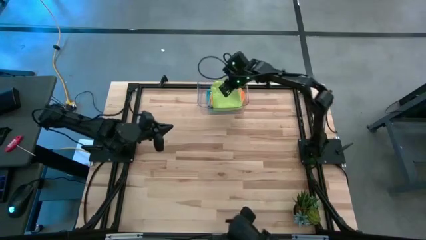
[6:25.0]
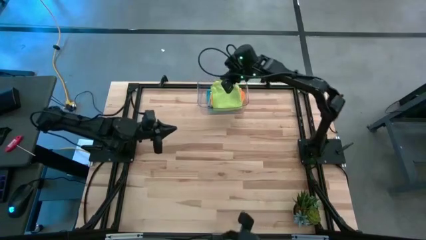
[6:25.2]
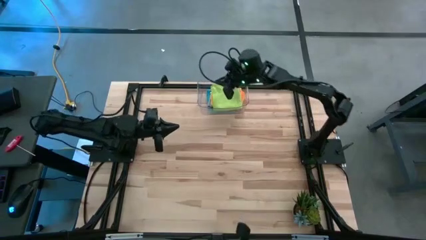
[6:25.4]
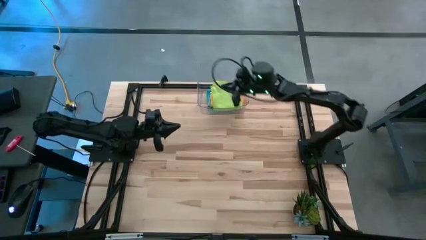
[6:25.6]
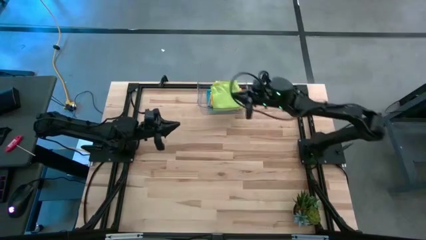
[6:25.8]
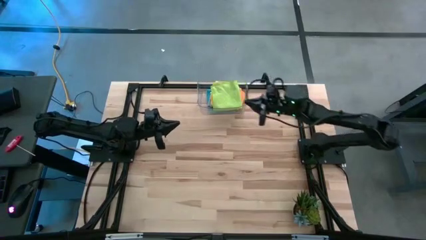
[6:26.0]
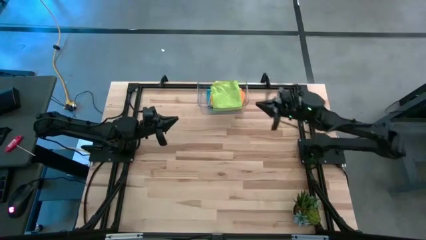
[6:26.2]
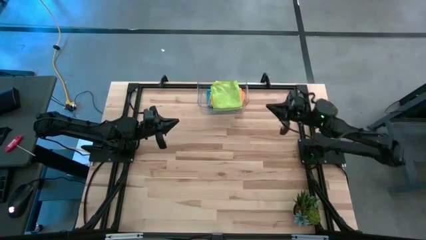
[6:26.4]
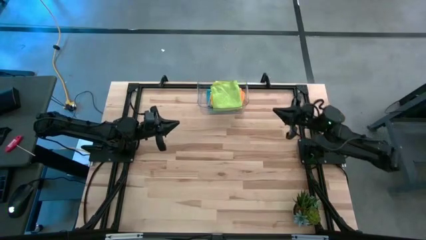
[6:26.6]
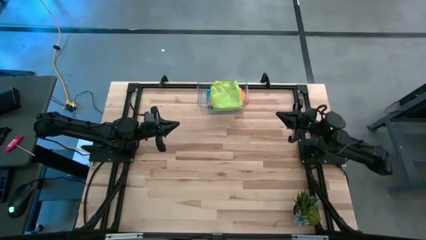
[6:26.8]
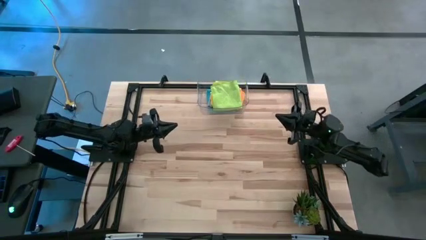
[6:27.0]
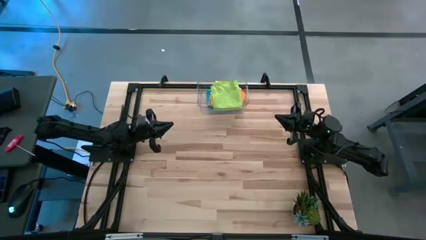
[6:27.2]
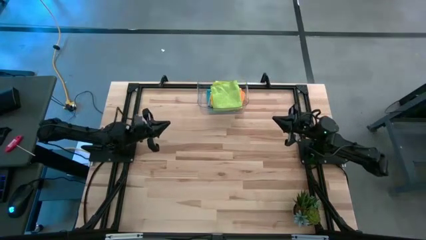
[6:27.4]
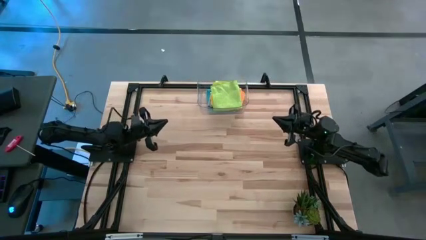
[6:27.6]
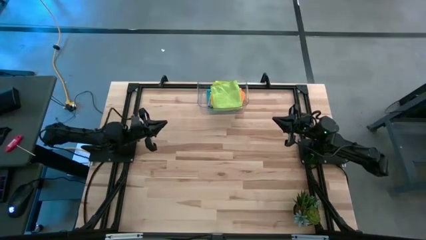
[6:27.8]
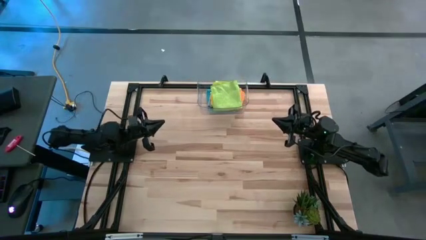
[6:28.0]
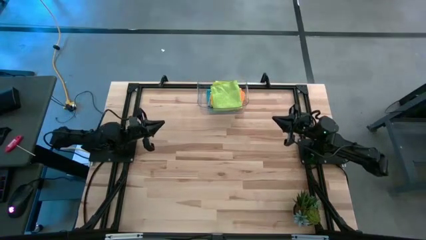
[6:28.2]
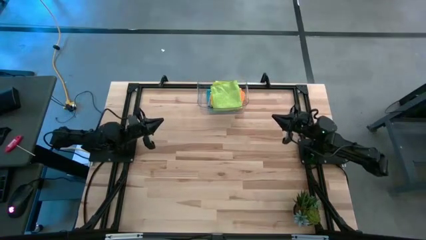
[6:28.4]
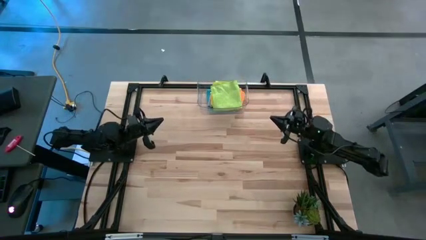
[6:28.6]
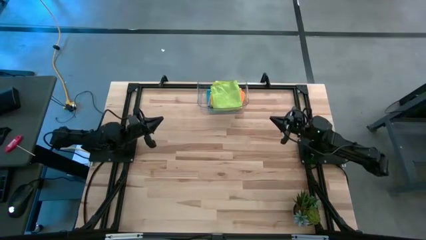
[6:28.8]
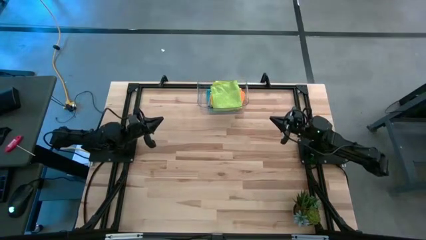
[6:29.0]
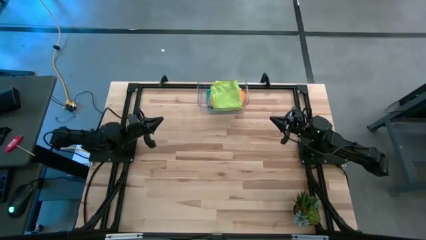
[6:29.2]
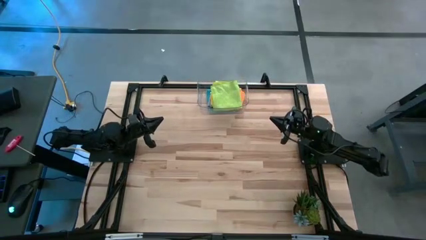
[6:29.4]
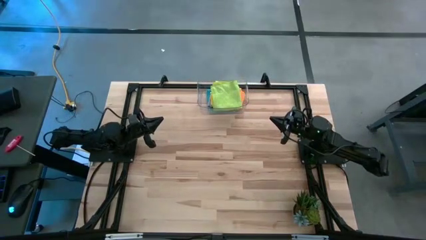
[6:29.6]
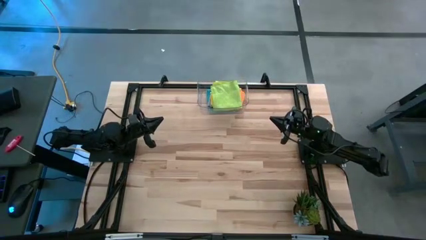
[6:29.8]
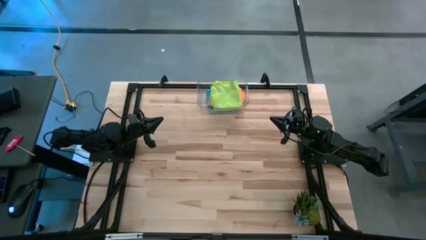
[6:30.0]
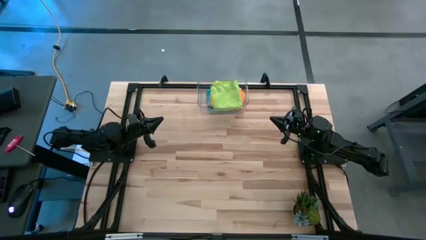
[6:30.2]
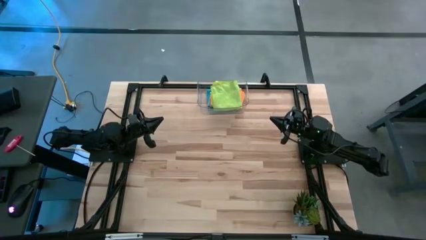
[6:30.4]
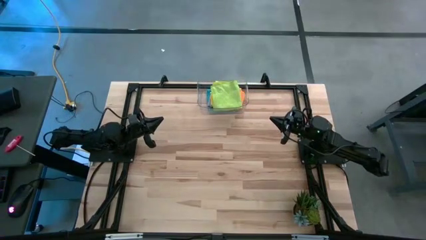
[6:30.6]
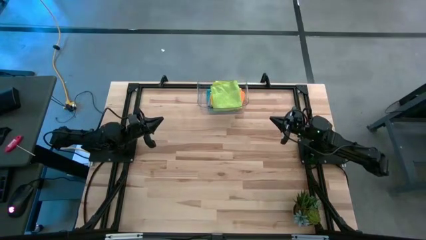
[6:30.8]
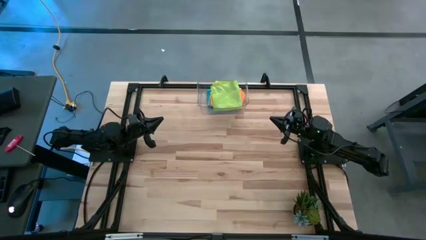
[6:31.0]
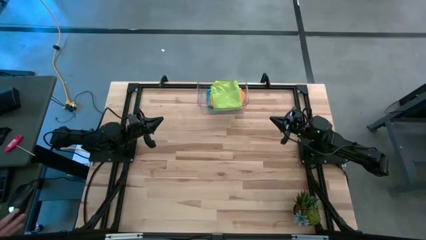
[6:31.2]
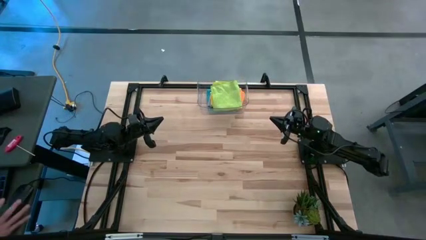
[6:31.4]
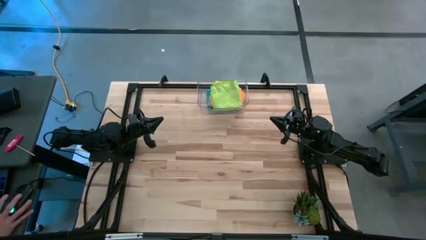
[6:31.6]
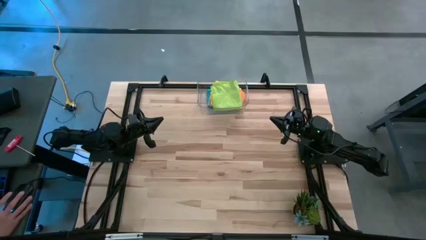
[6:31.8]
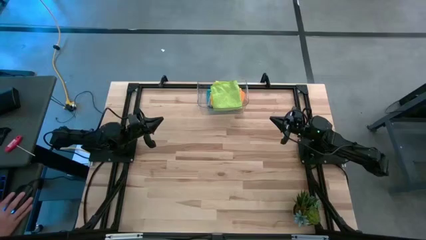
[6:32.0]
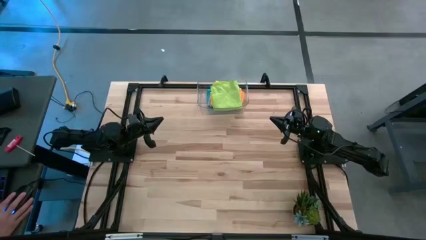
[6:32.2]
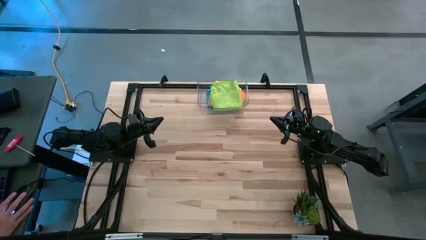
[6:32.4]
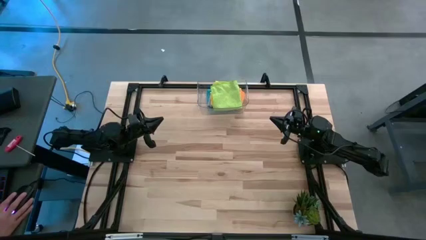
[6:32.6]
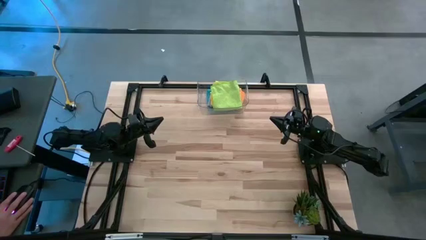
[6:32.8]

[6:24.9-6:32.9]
Task: Fold microfiber towels
Return To Home Position

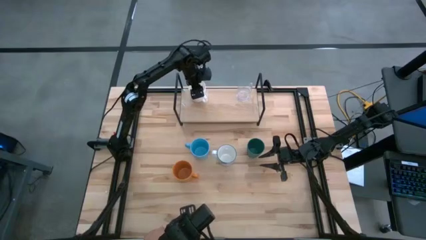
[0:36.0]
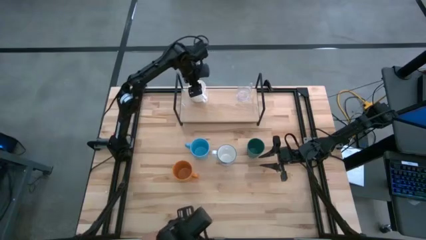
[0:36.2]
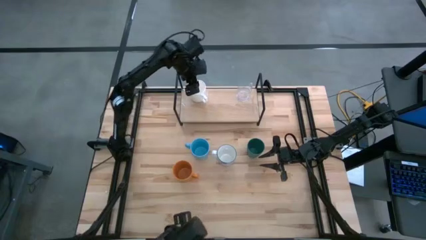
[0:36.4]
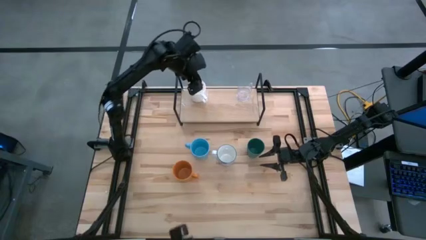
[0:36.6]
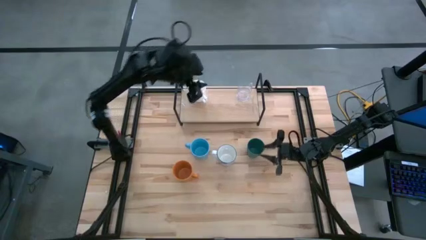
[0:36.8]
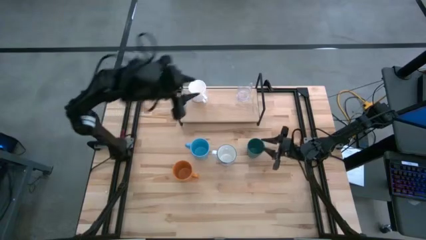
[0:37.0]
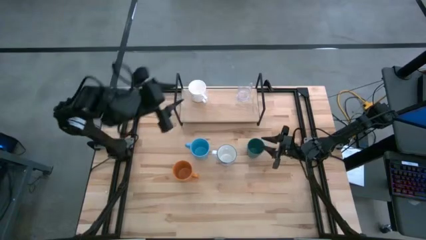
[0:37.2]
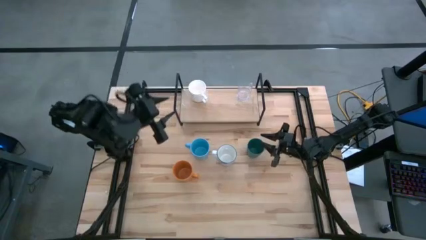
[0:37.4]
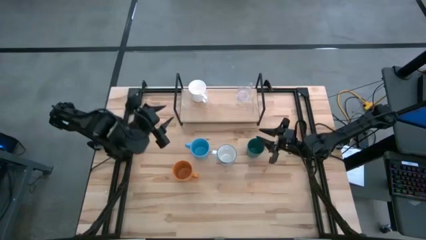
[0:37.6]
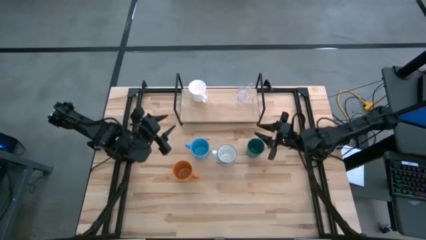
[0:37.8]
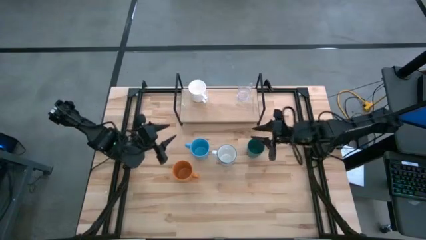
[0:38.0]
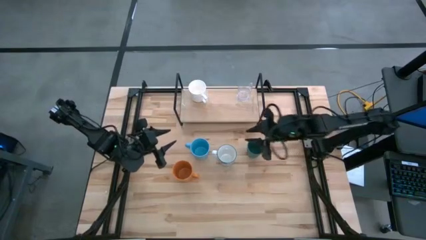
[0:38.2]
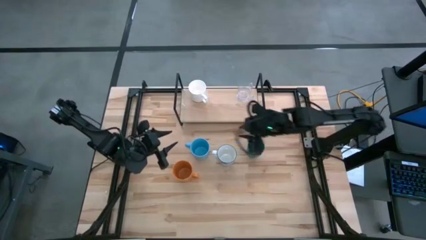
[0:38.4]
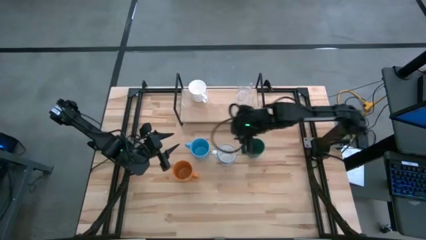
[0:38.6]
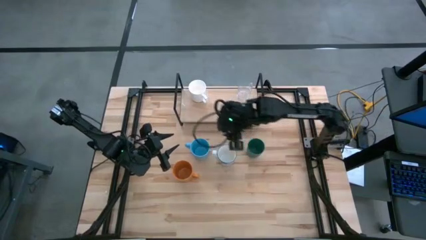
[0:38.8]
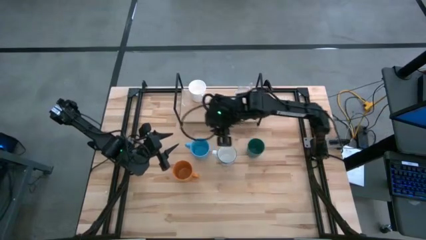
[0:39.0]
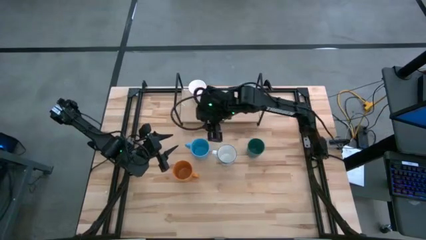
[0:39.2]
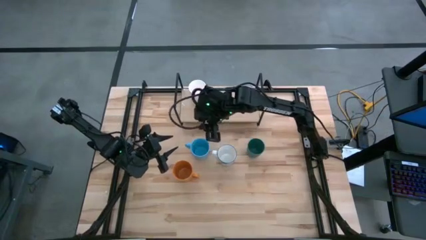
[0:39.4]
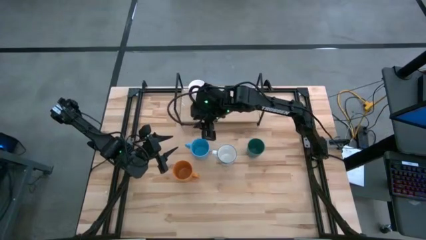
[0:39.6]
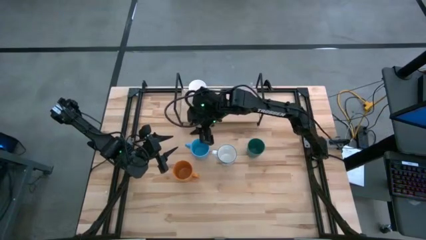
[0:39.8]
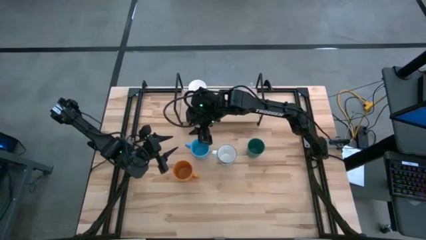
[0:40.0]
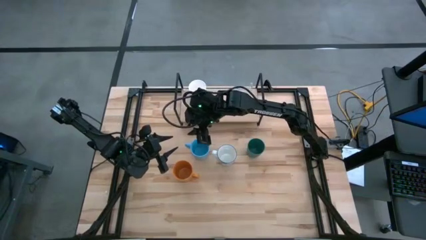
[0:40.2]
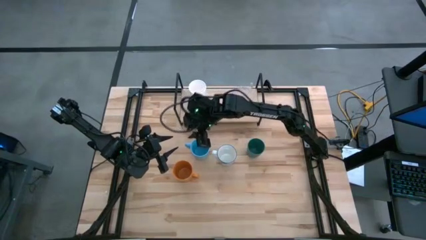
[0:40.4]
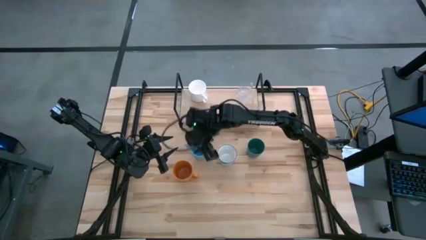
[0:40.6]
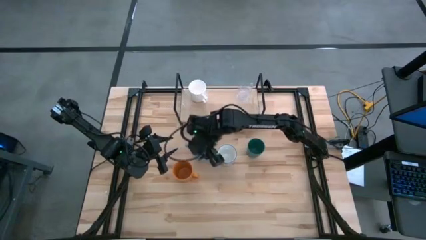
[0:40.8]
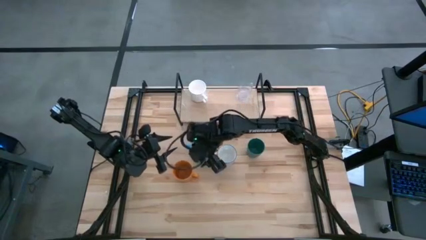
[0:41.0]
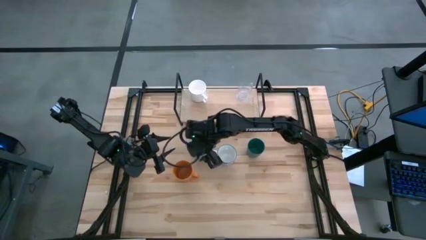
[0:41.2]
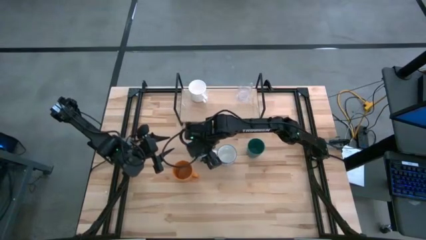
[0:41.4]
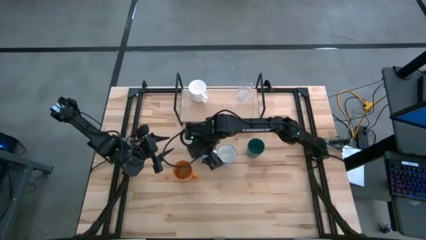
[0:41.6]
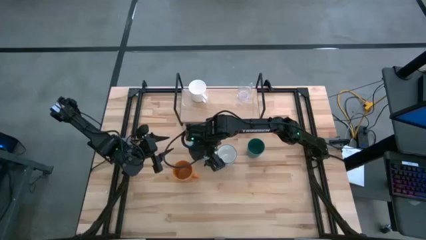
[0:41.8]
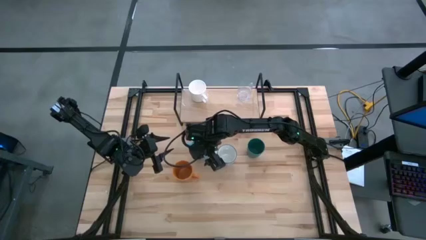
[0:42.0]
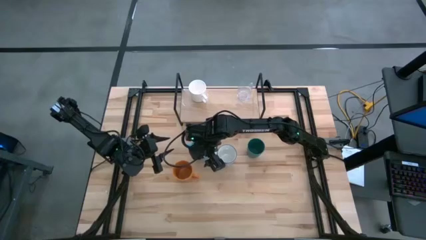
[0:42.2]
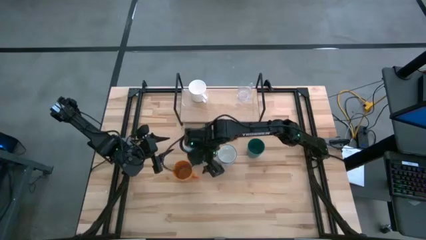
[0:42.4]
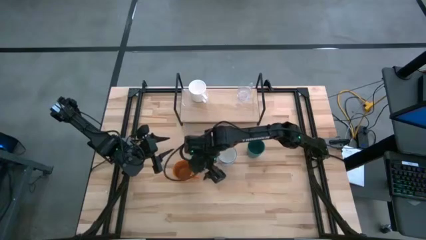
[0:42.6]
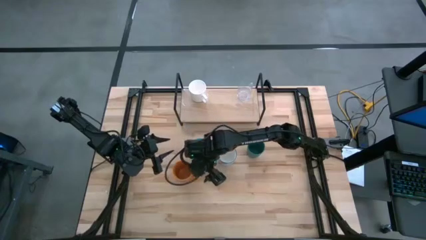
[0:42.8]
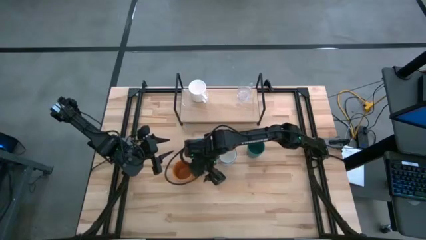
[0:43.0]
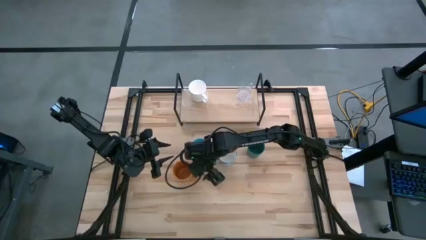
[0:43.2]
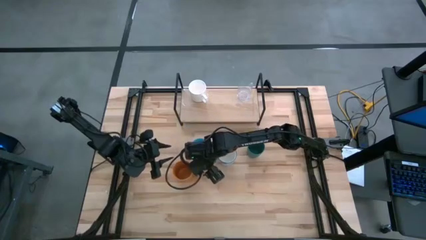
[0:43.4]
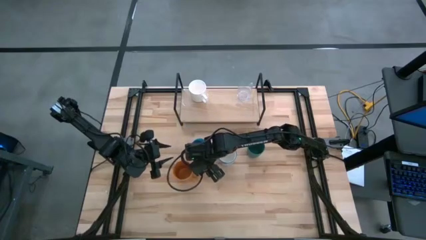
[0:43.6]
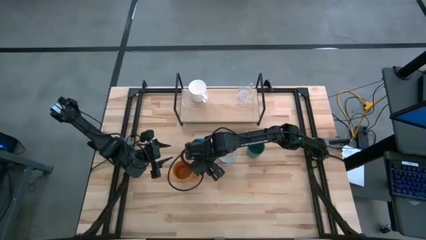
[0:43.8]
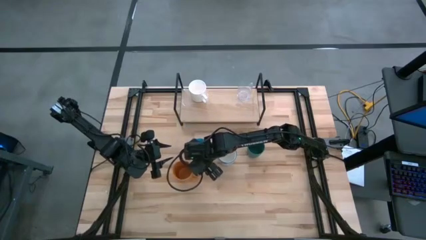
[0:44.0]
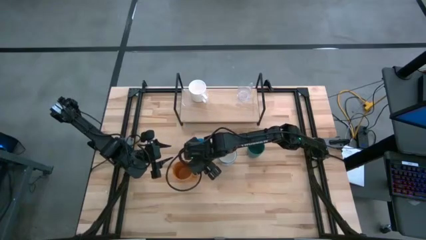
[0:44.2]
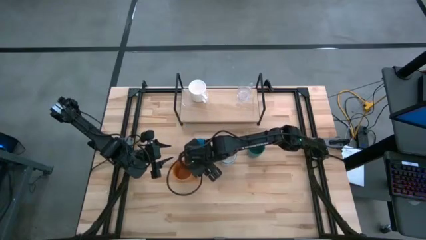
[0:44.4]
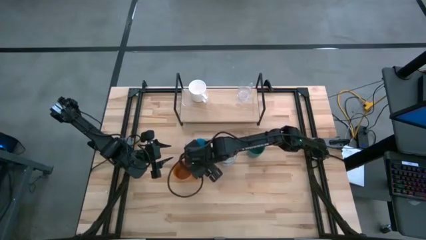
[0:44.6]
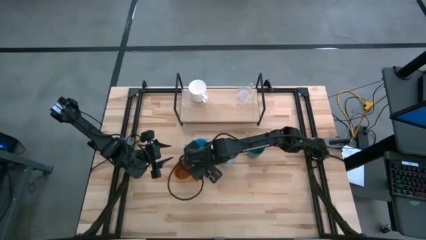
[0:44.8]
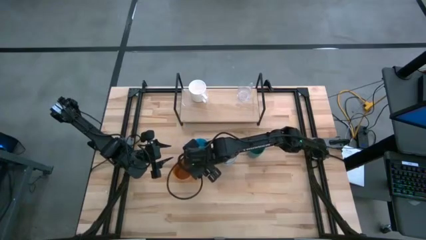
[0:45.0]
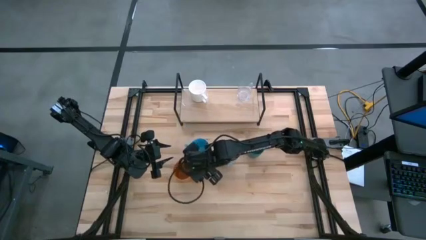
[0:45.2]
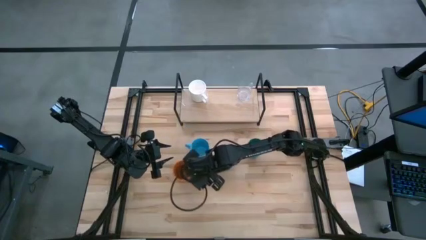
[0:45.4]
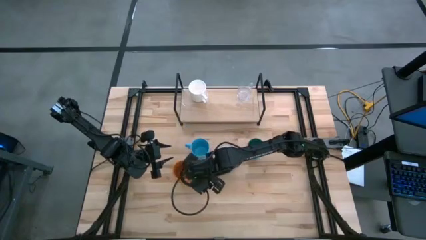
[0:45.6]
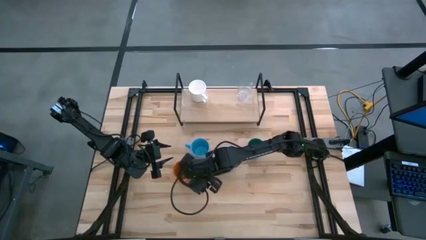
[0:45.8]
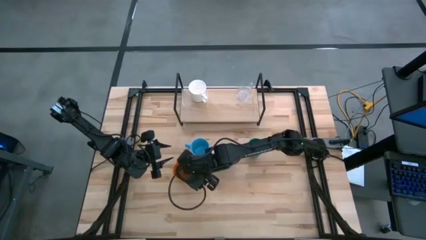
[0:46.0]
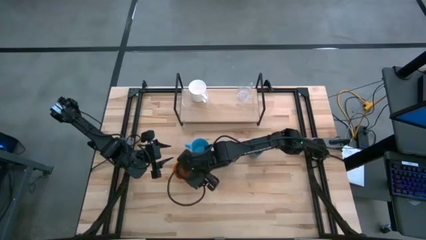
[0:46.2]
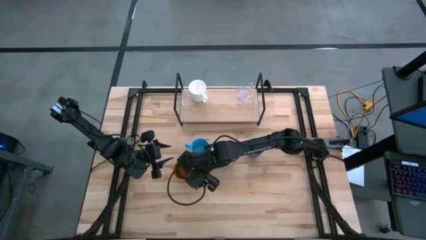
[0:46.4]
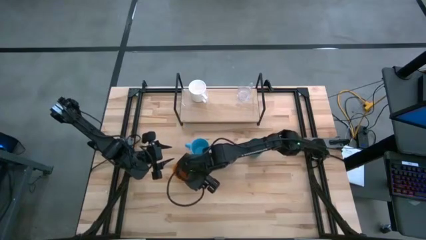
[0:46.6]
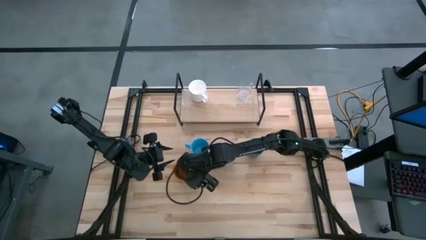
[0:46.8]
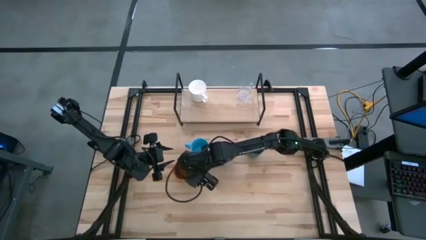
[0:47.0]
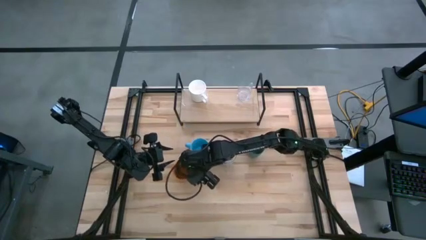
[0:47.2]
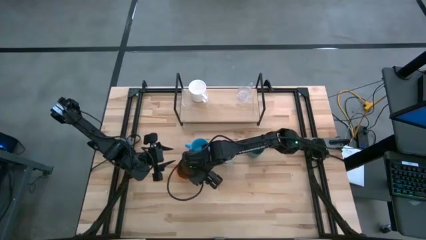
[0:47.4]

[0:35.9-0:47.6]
Task: Stack small to large cups/mugs on shelf
Put the orange mug on the shelf
